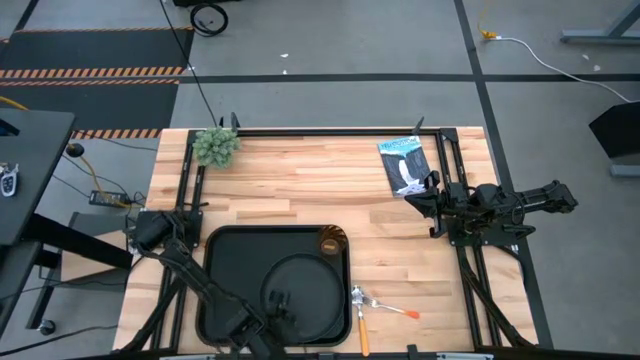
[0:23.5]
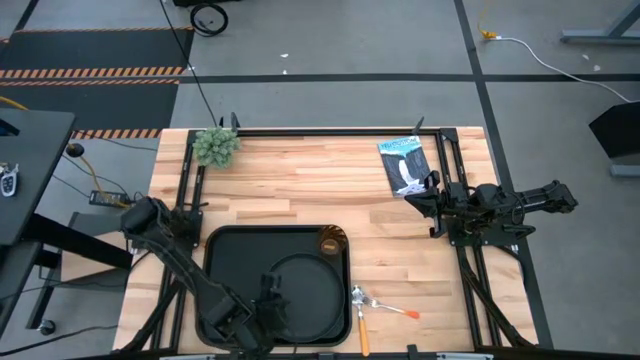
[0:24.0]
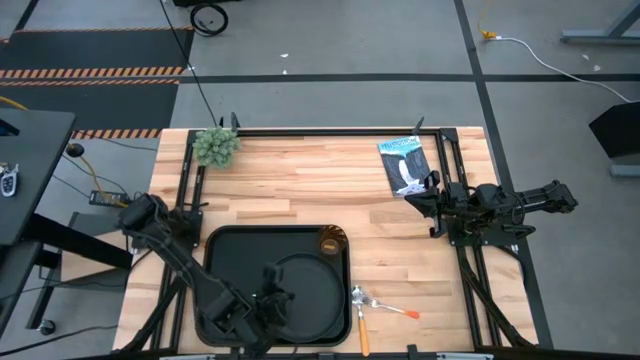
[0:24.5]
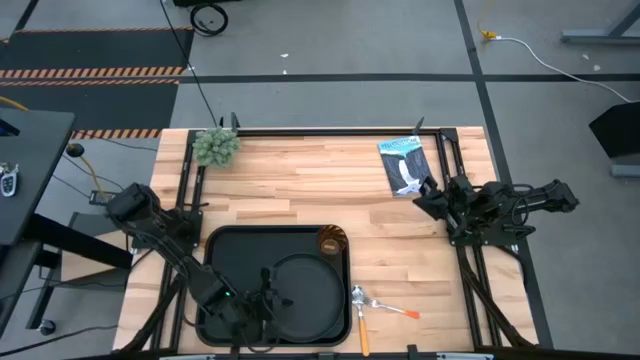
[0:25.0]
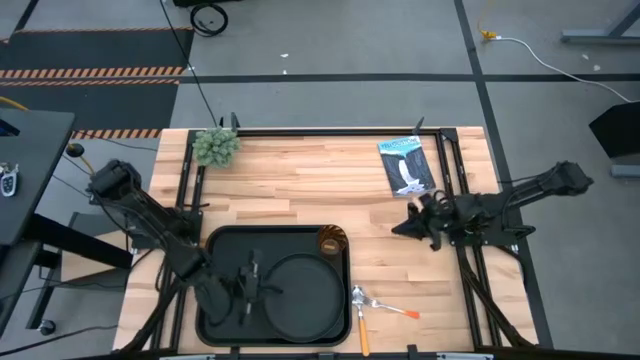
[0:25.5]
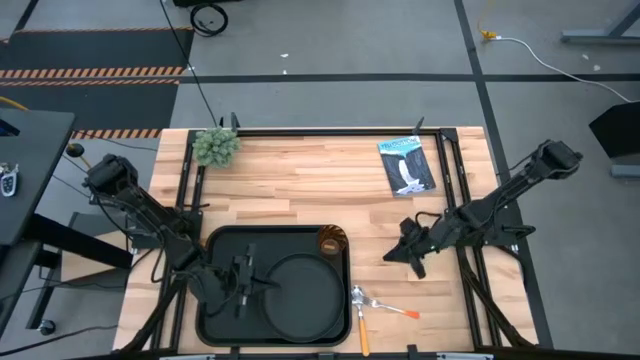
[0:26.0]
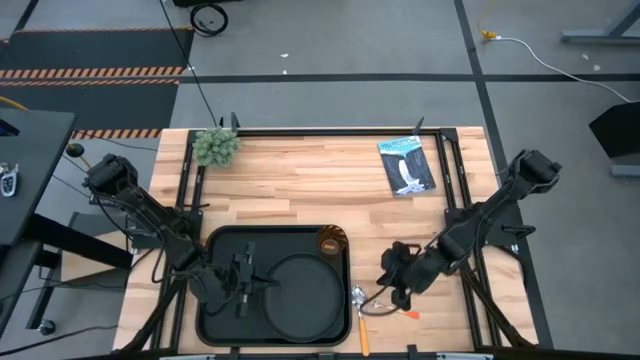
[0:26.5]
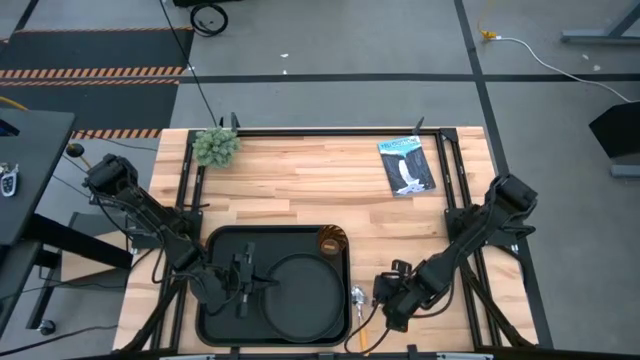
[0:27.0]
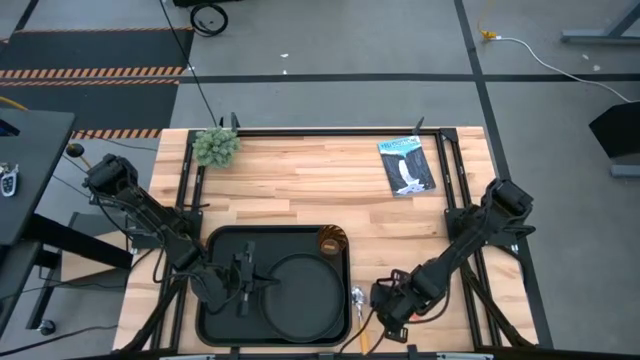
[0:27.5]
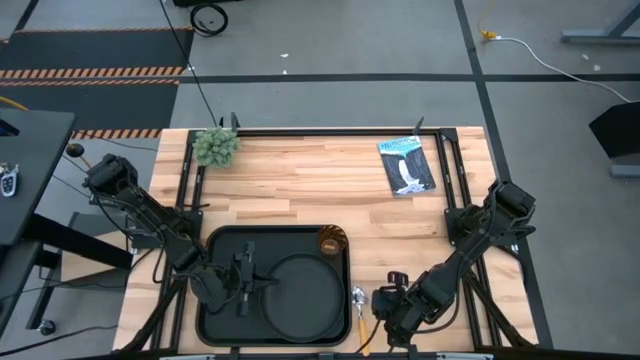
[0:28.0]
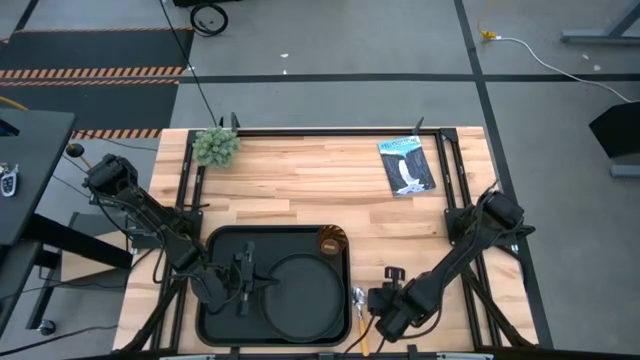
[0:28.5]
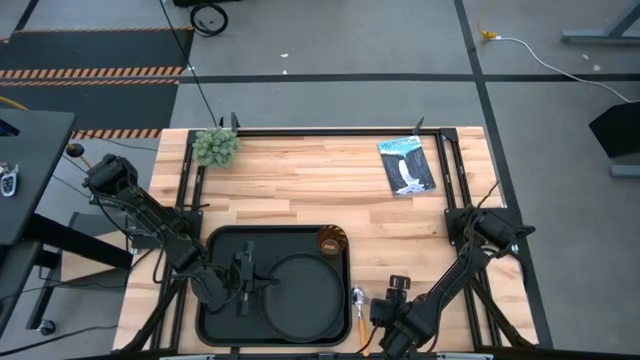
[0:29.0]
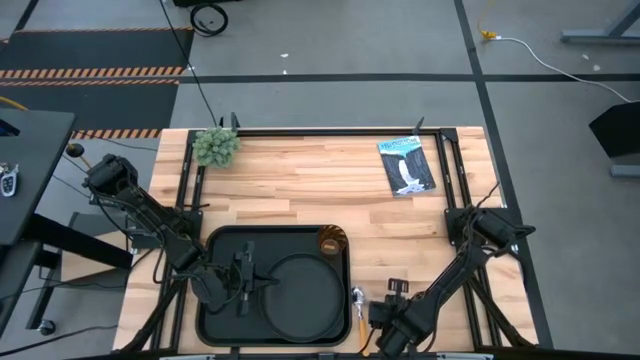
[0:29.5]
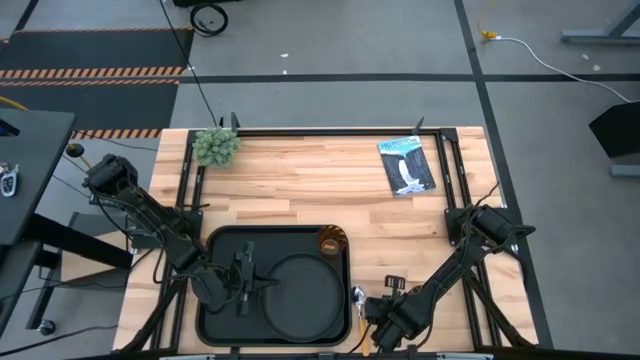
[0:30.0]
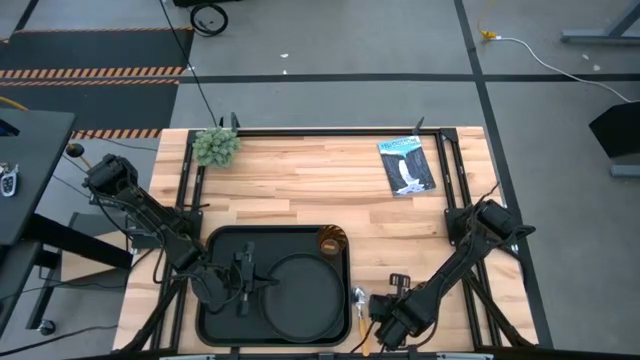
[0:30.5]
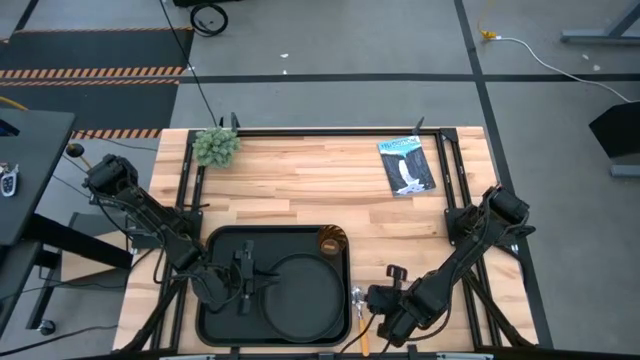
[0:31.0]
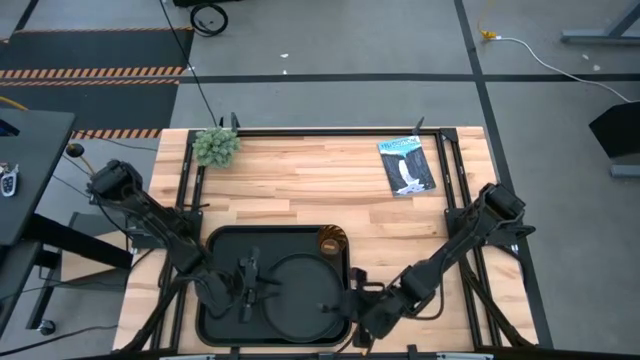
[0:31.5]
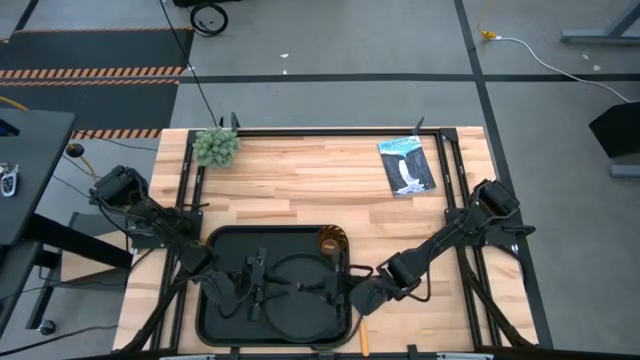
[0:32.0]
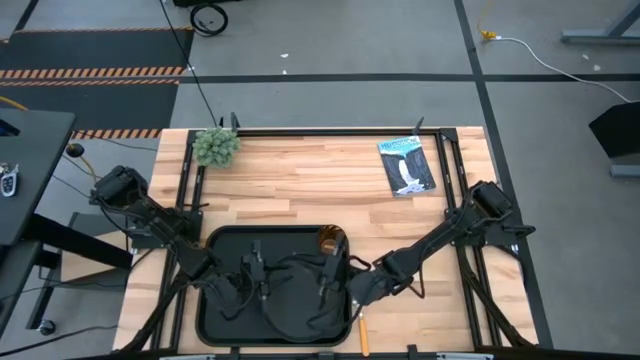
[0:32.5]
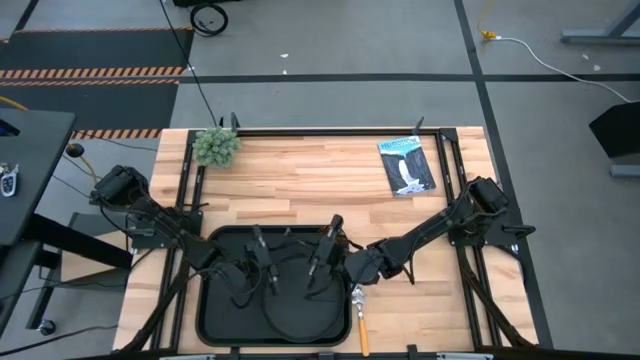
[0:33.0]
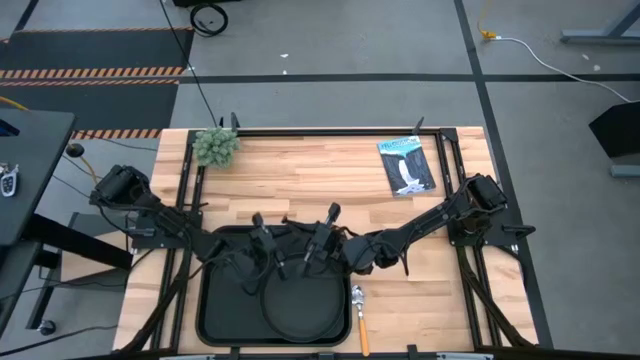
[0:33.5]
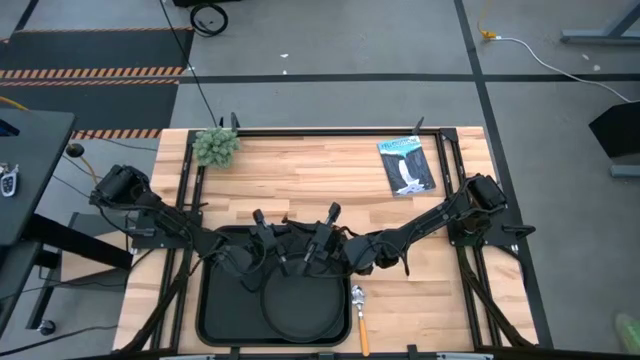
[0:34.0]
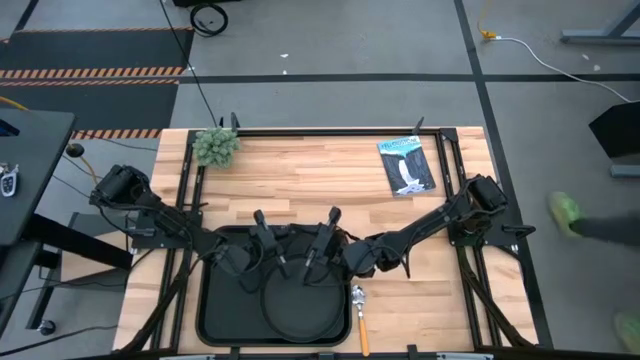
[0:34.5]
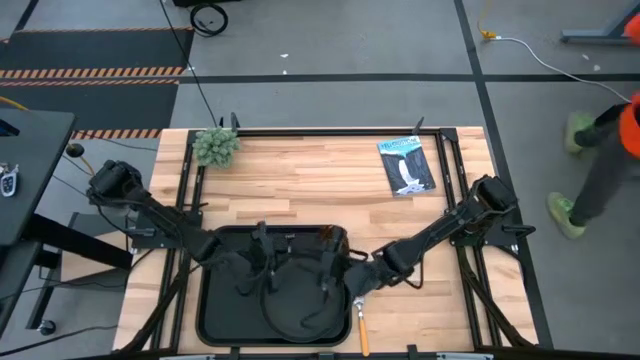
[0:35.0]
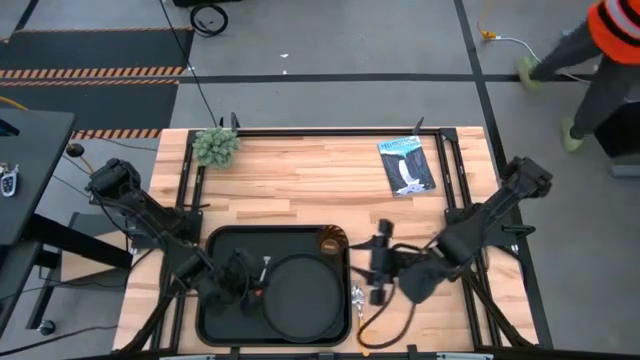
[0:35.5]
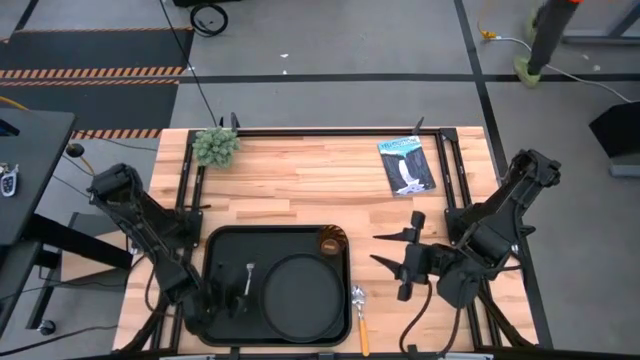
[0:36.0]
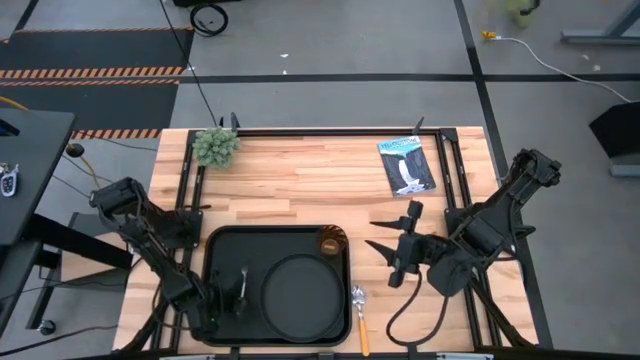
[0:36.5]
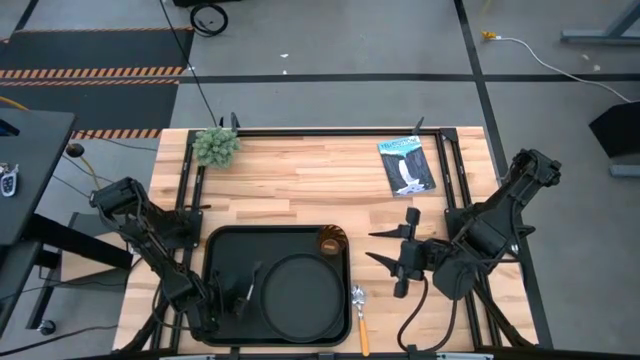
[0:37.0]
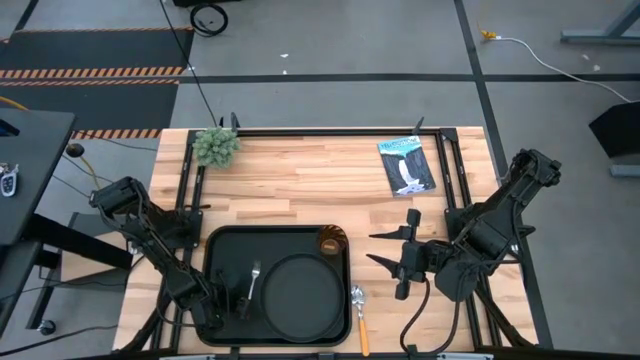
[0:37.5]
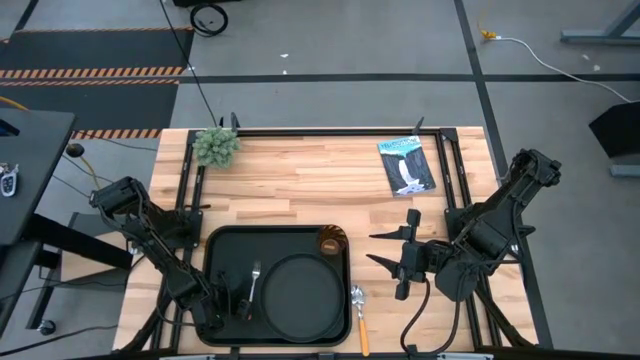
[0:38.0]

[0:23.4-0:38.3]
Task: Pick and place plate/cup/fork/spoon on tray
Put the orange fork on the black tray

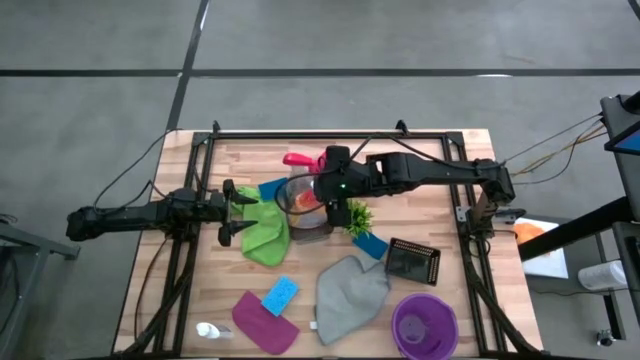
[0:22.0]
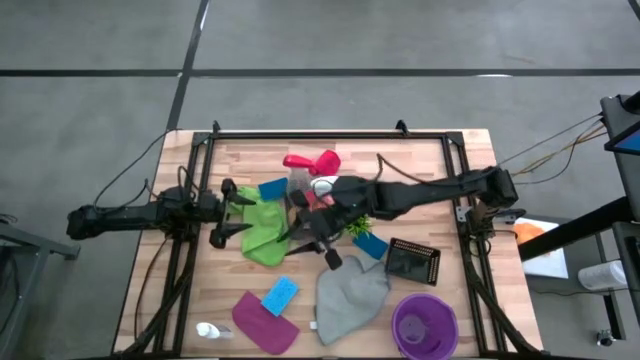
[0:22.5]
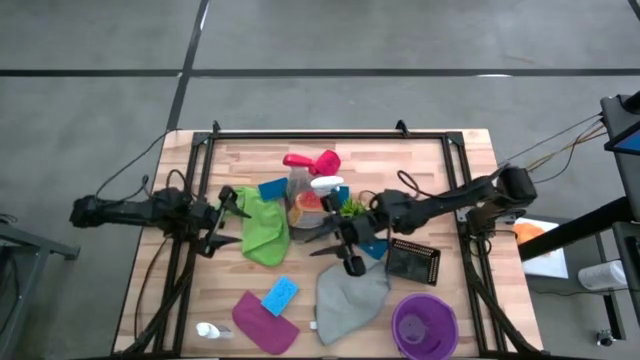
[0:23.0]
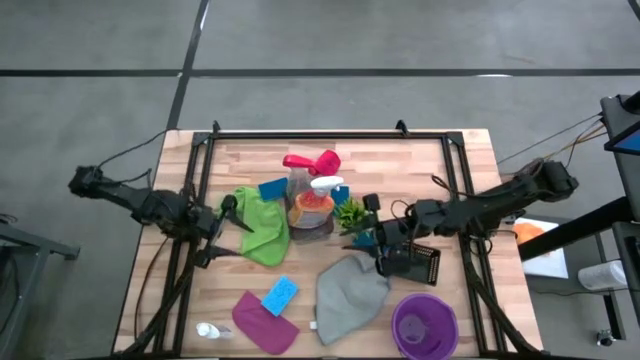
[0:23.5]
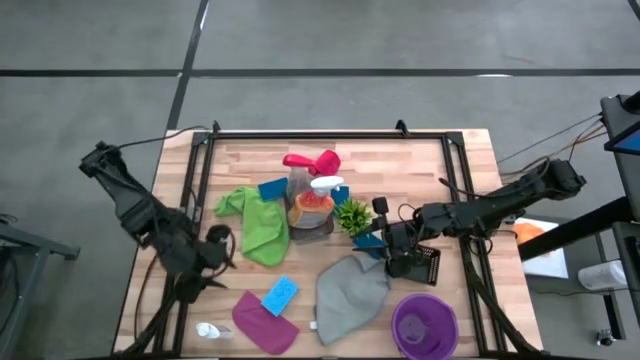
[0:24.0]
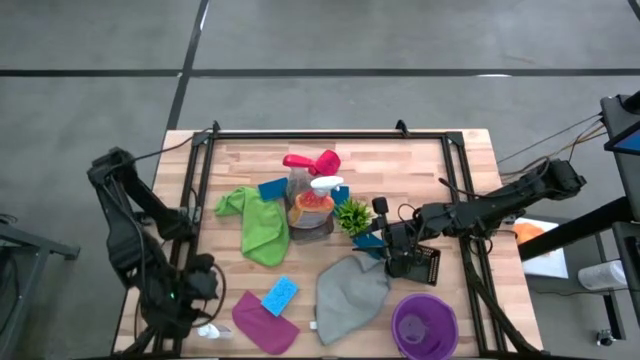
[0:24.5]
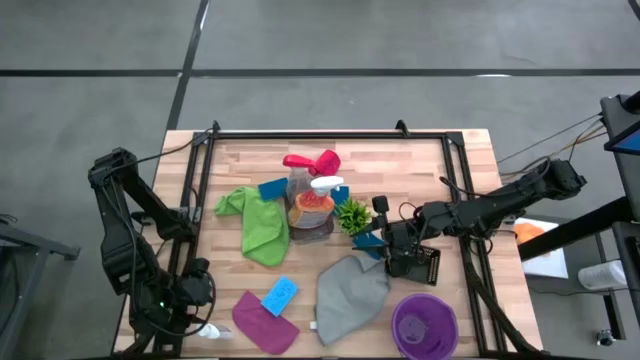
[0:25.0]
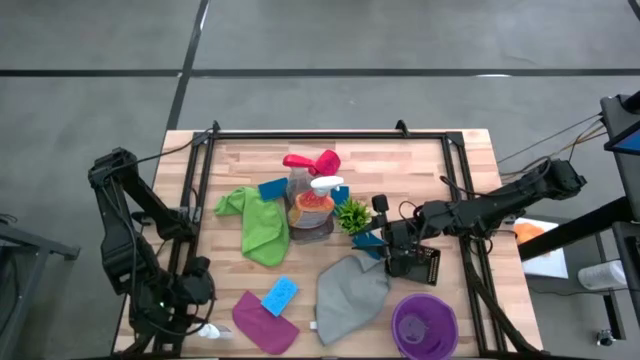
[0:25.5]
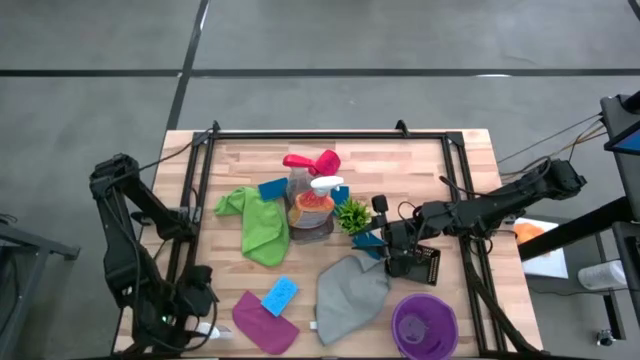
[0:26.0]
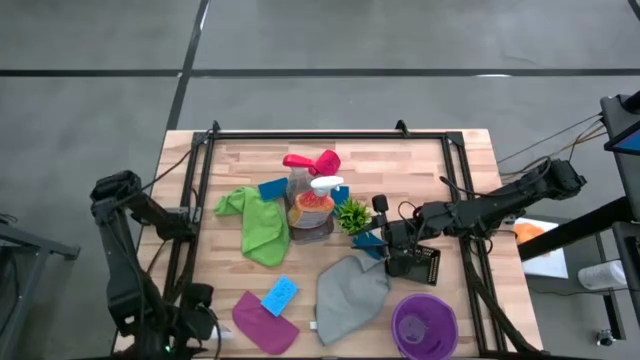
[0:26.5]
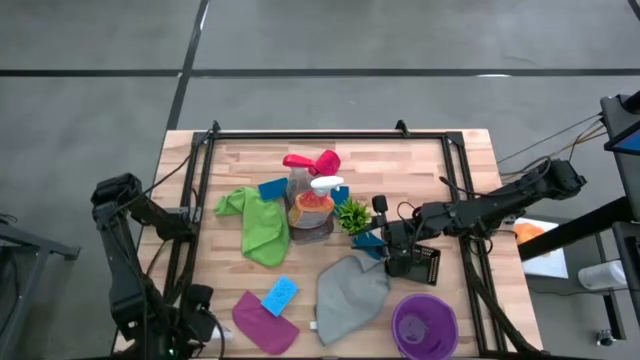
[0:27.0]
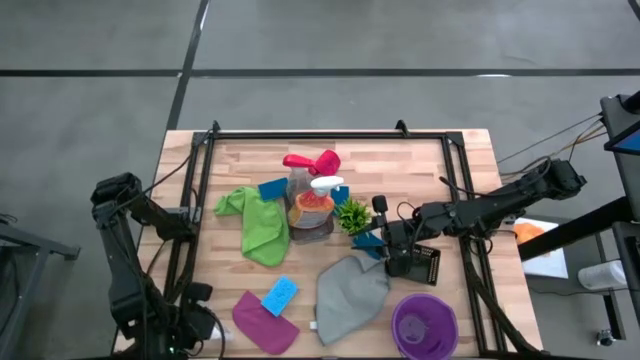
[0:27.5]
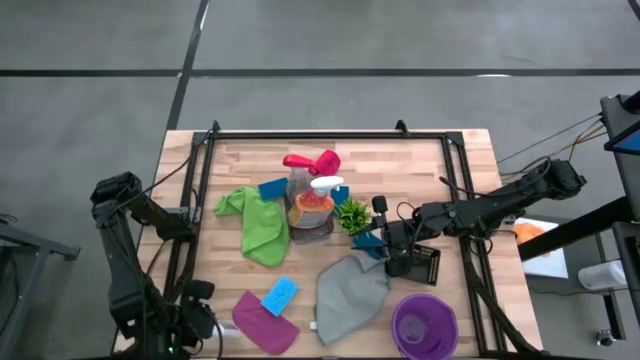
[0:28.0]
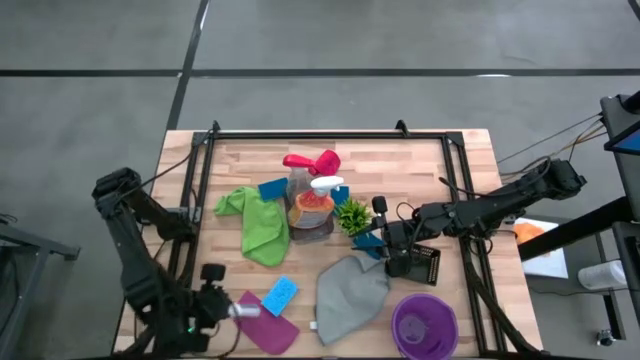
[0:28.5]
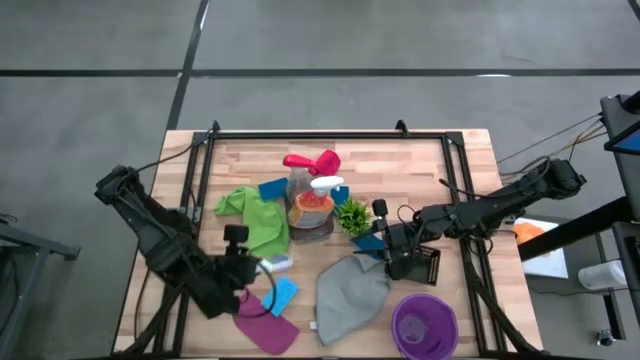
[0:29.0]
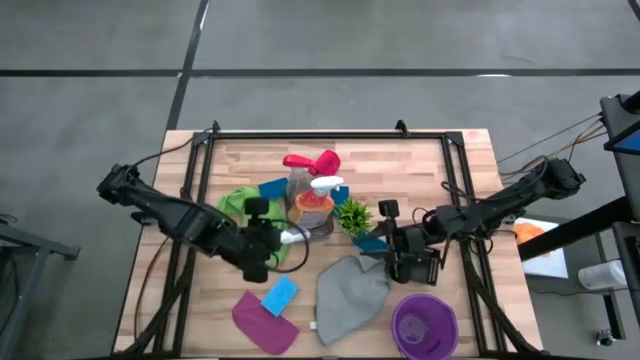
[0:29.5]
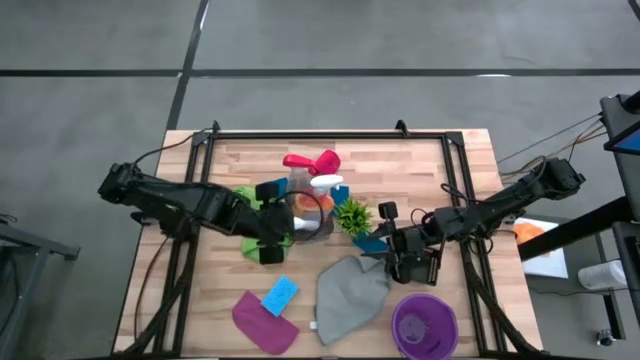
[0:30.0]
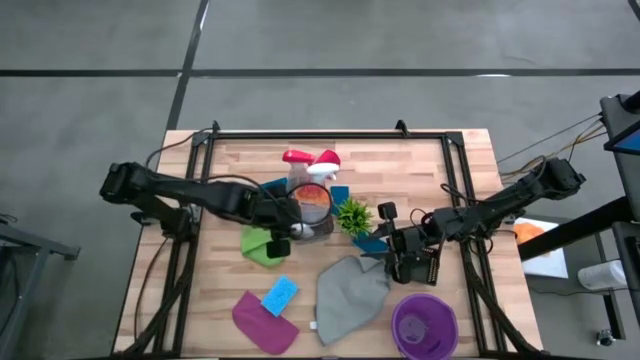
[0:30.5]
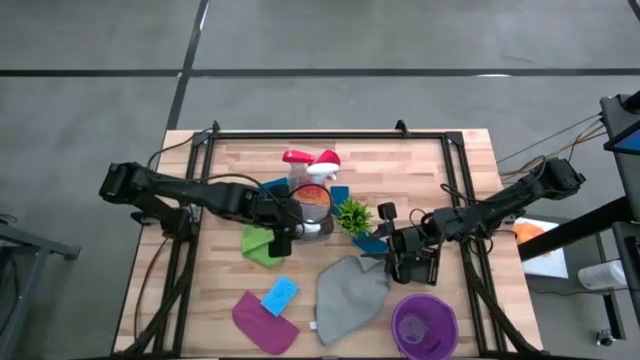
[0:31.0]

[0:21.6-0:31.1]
Task: Pick & Place Kitchen Items
Put the white plastic restorer bottle into the transparent black bin
